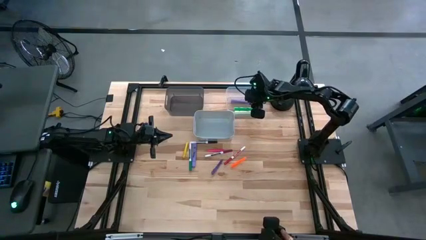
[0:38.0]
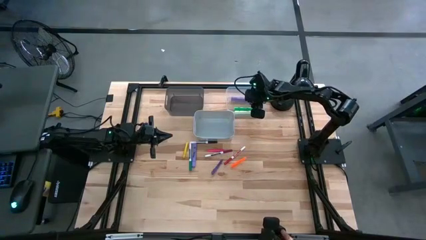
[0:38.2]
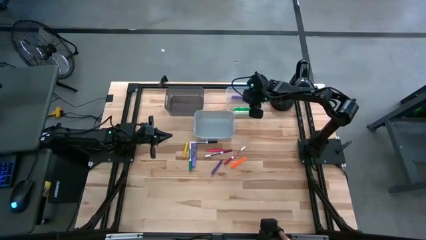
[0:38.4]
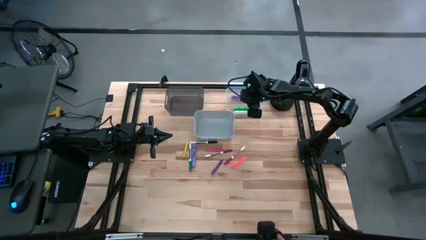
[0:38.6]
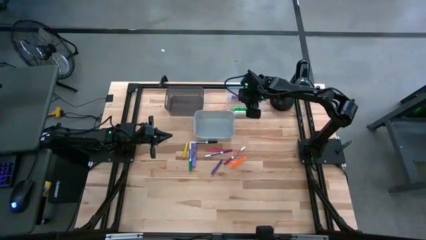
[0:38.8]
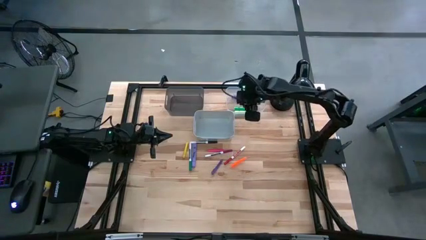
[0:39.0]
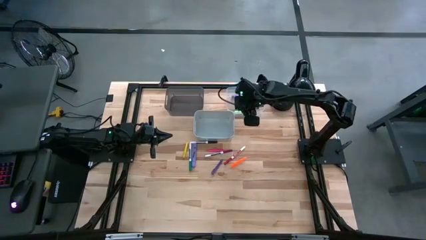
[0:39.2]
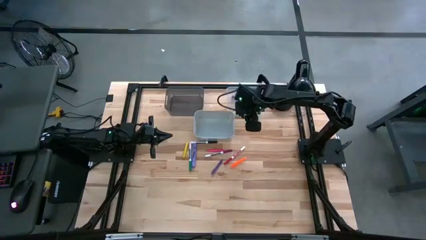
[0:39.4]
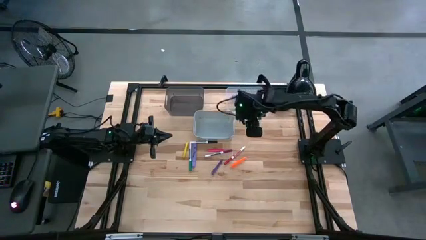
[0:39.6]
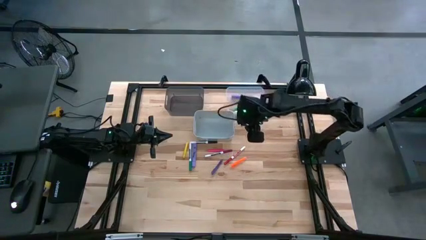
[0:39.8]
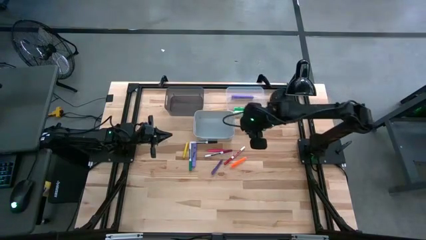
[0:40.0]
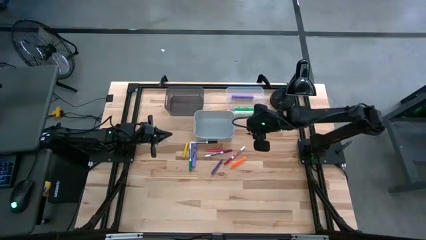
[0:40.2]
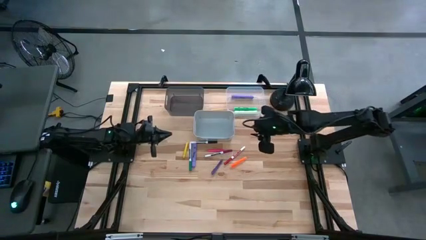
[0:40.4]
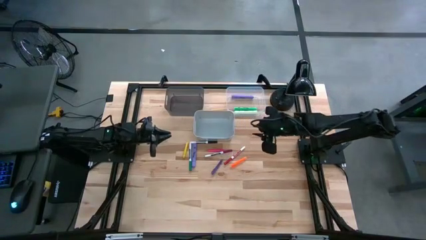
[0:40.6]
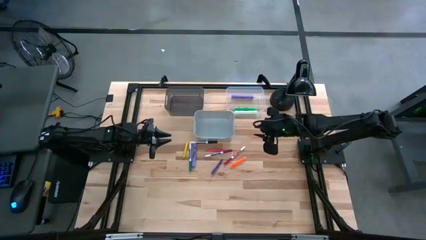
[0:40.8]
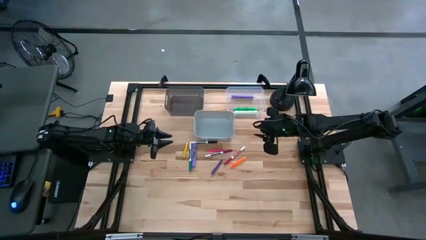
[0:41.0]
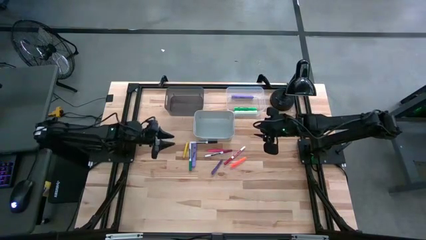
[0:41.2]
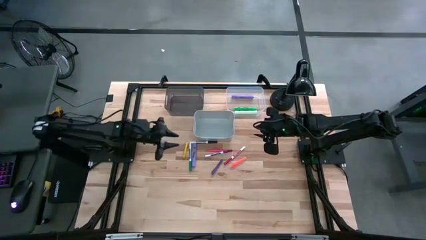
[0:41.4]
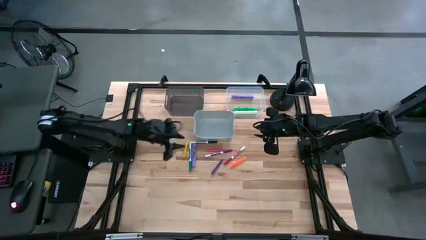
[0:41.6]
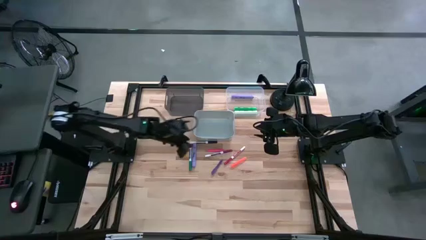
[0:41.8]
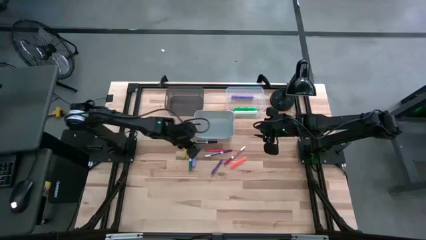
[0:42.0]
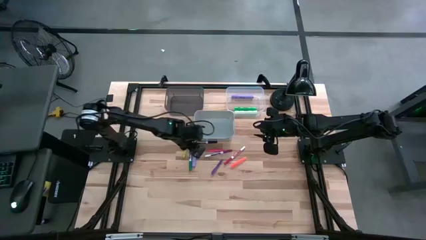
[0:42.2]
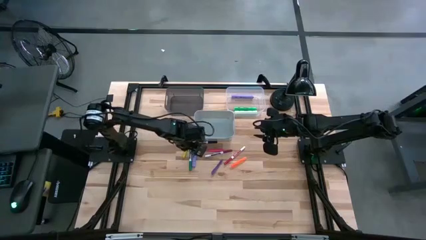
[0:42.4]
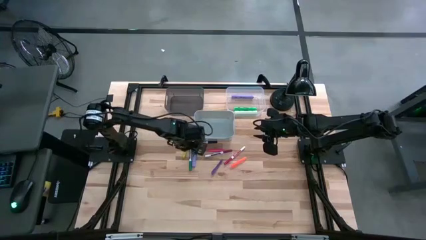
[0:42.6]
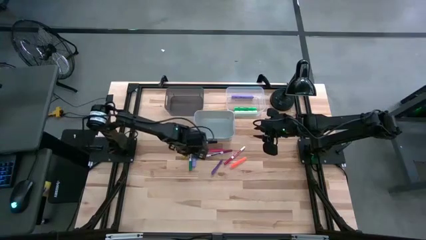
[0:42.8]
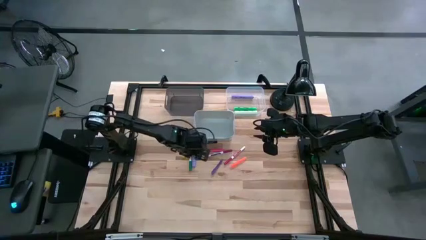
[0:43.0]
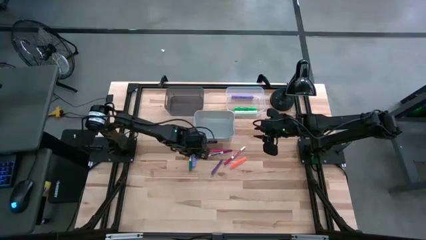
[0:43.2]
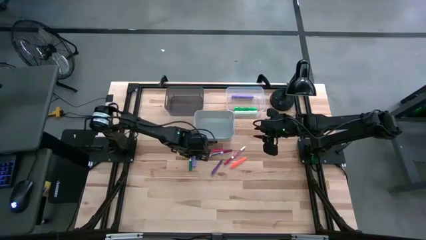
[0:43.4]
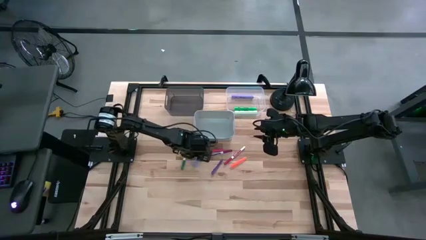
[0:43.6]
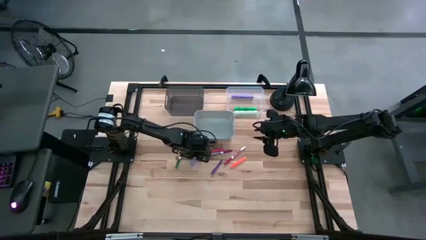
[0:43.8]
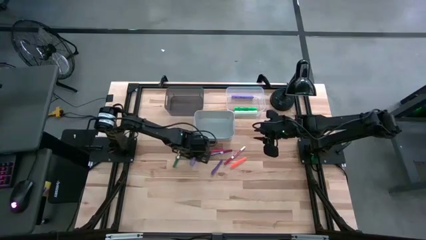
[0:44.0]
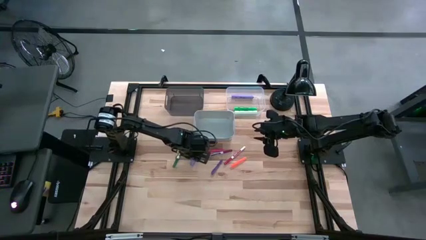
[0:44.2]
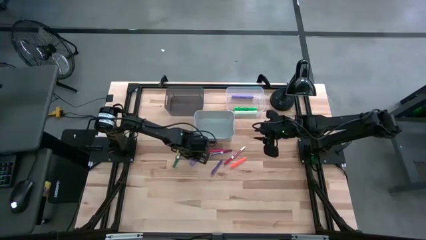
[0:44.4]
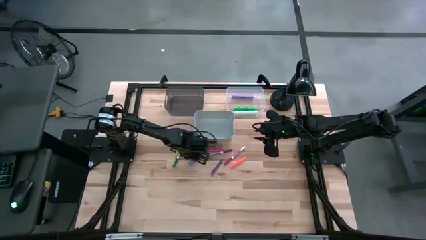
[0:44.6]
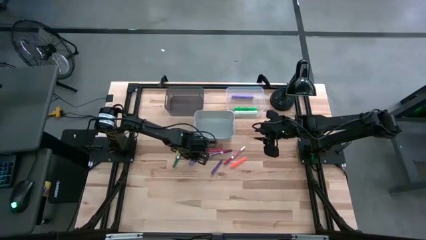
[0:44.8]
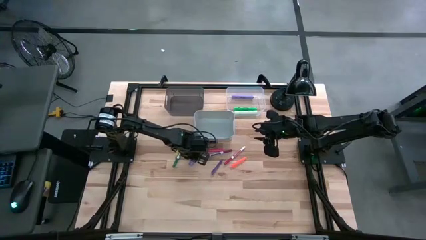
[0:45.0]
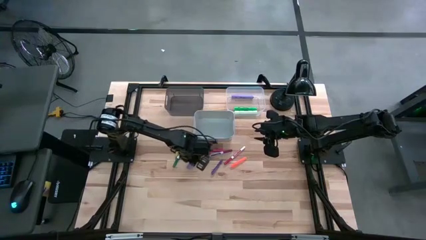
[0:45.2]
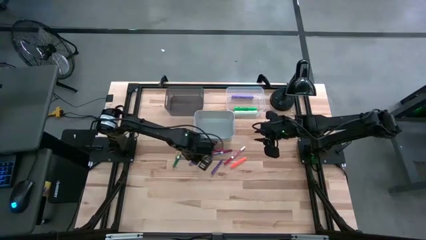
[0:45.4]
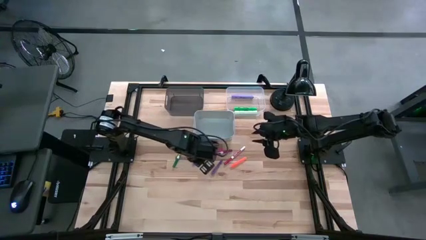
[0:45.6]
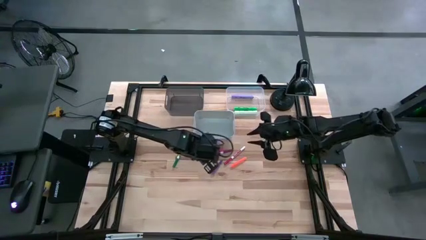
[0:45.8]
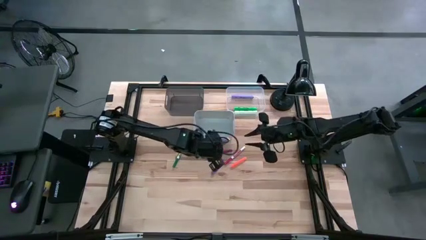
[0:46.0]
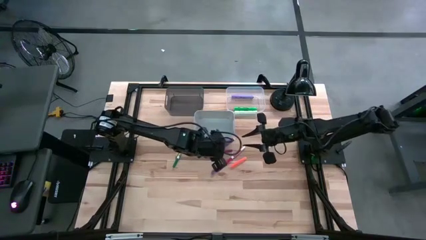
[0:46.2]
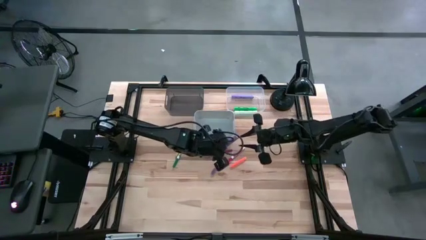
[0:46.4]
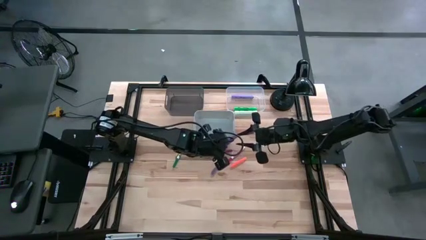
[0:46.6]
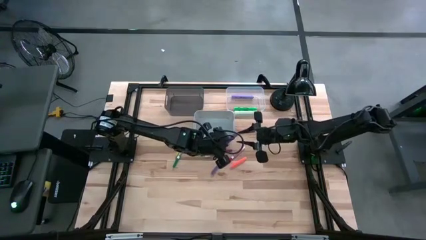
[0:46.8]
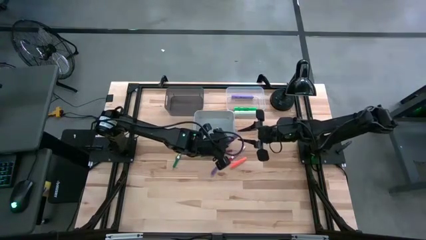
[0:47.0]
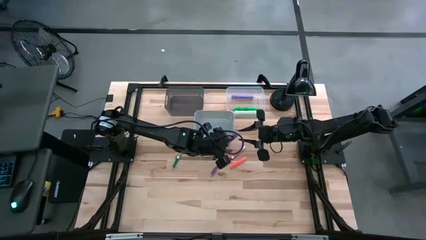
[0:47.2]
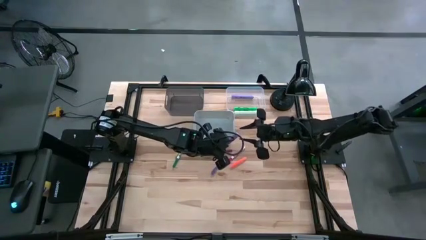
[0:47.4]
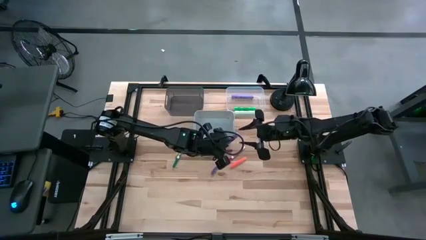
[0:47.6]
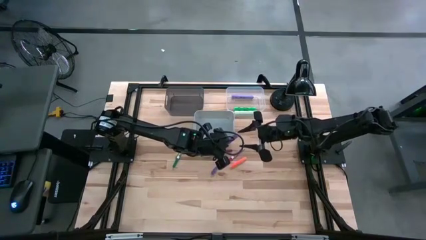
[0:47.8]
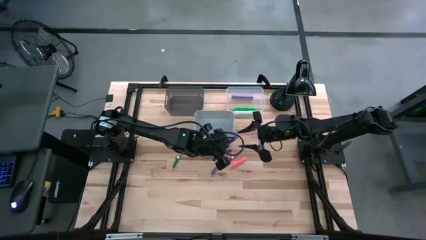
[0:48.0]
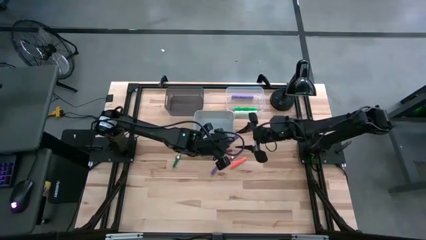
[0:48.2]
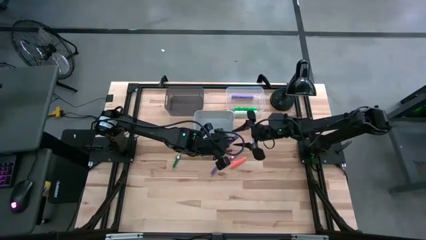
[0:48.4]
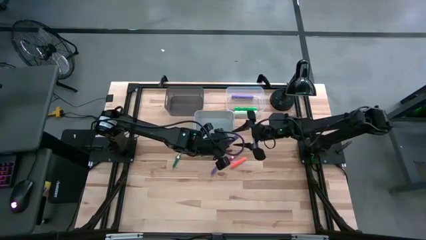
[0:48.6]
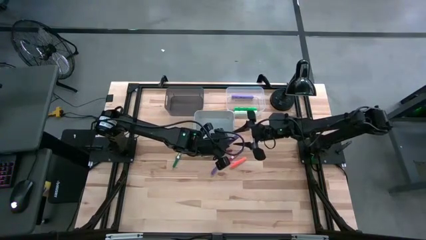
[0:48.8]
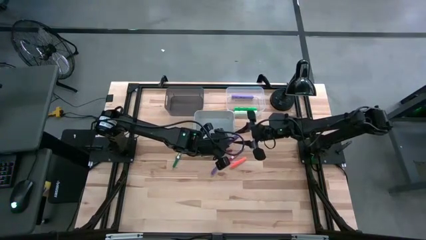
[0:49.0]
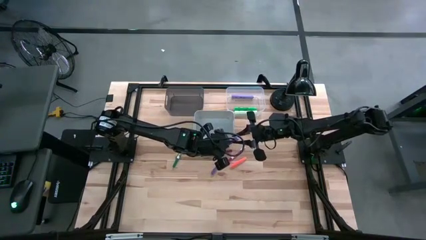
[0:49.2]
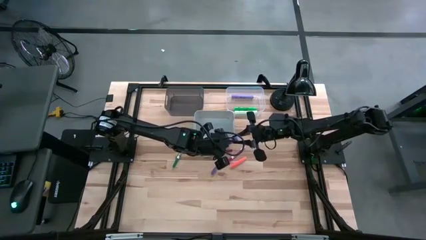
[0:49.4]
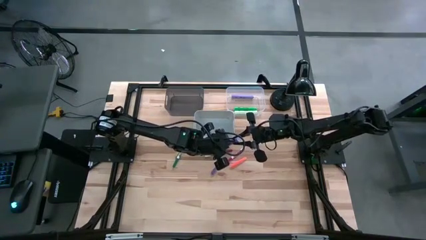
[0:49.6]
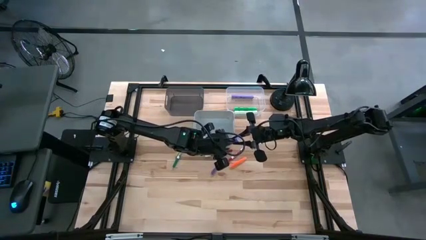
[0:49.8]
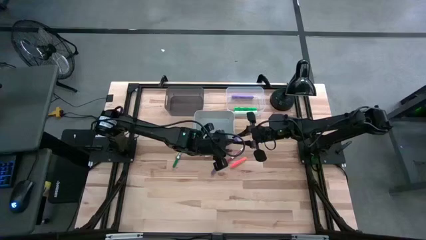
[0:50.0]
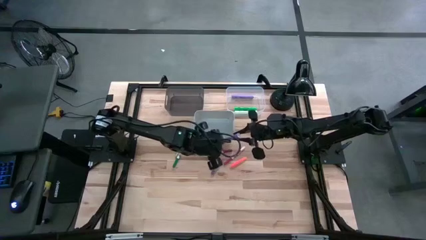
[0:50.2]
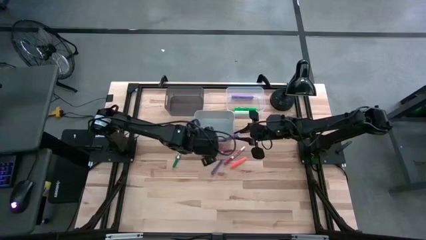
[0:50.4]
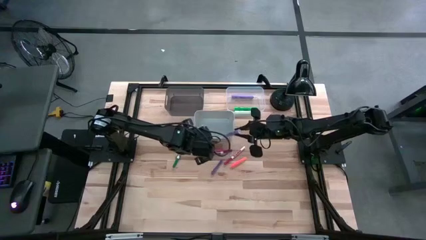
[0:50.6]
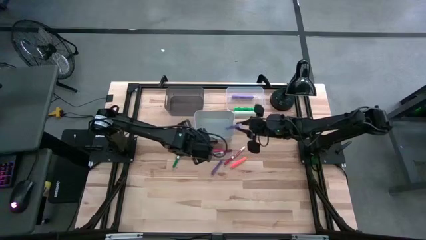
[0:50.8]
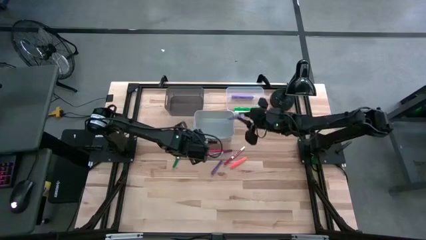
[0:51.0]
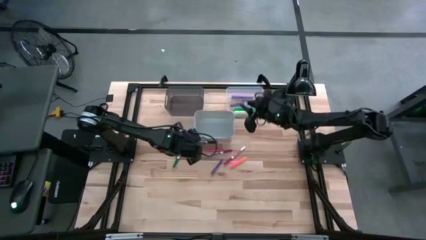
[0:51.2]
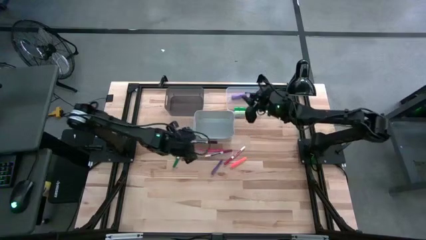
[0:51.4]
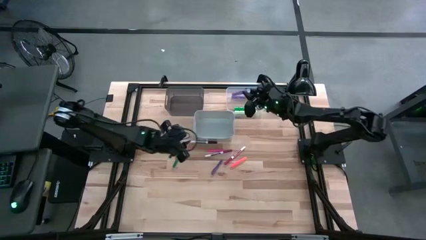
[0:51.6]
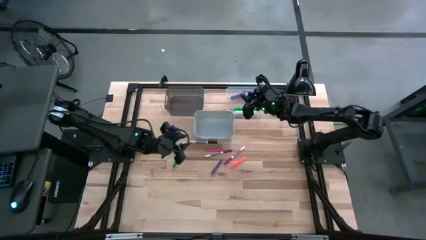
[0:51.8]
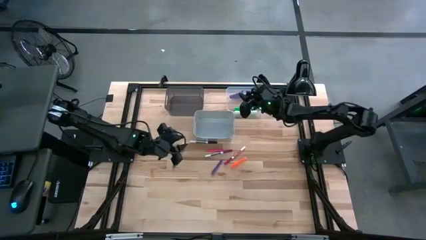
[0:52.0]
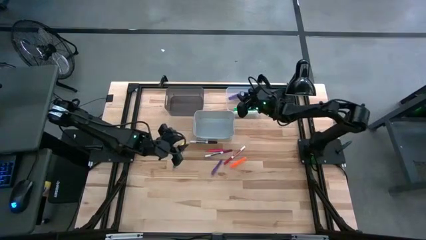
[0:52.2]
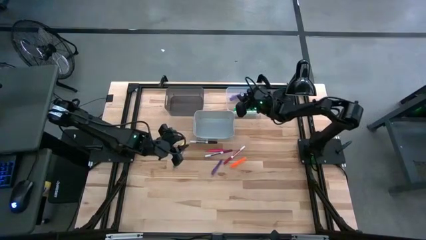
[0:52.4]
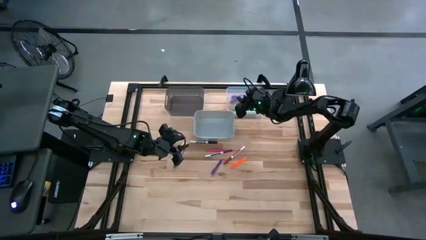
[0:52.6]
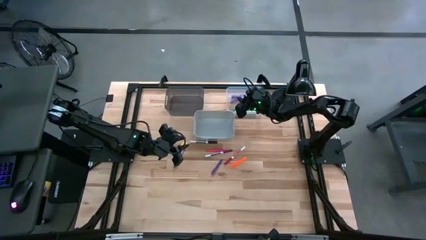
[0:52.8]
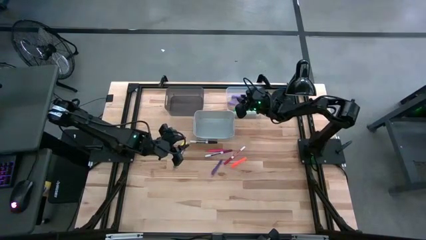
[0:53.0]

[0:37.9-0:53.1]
Task: Pick & Place Markers
Put the purple highlighter into the transparent bin
